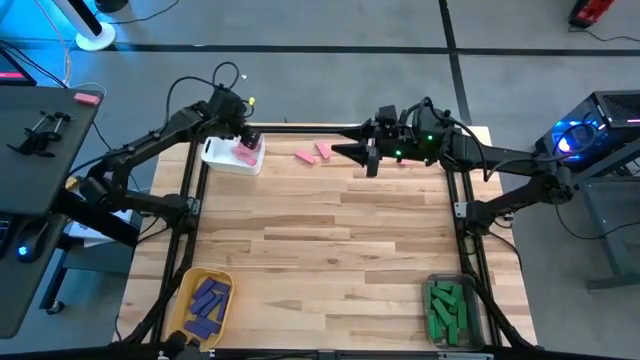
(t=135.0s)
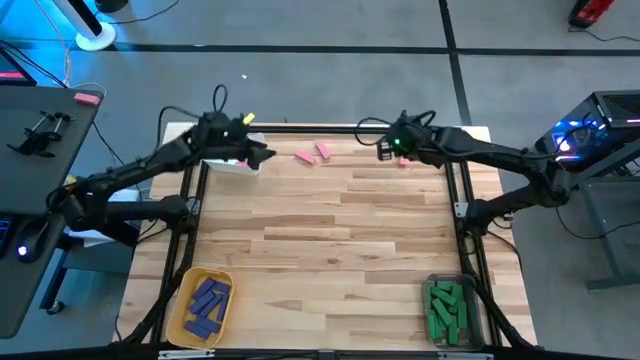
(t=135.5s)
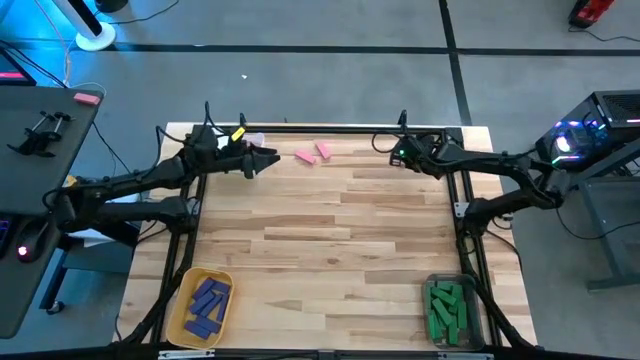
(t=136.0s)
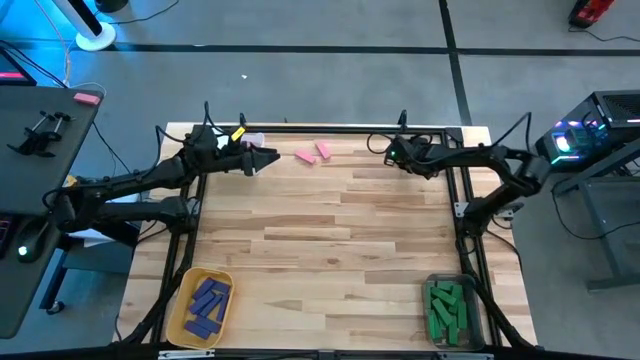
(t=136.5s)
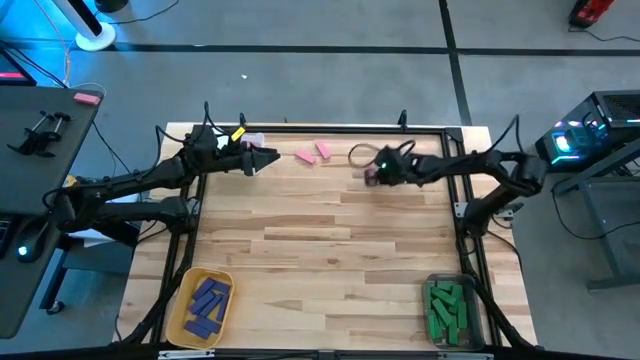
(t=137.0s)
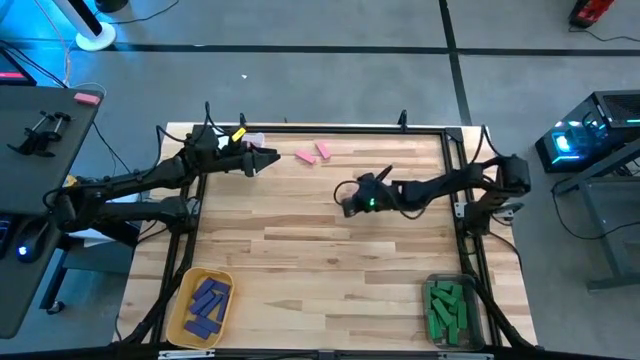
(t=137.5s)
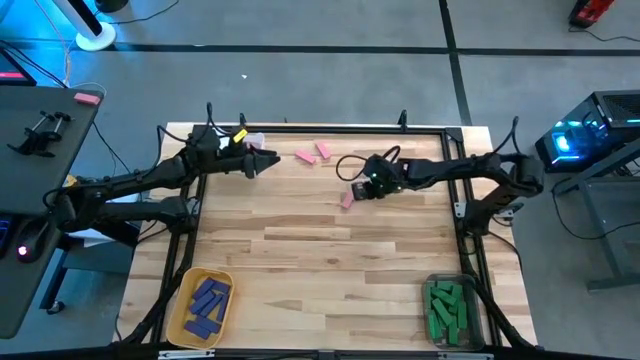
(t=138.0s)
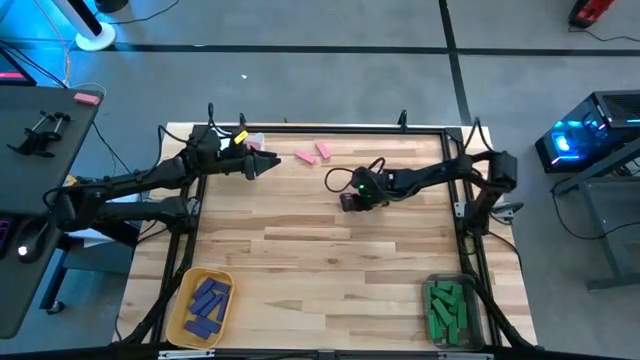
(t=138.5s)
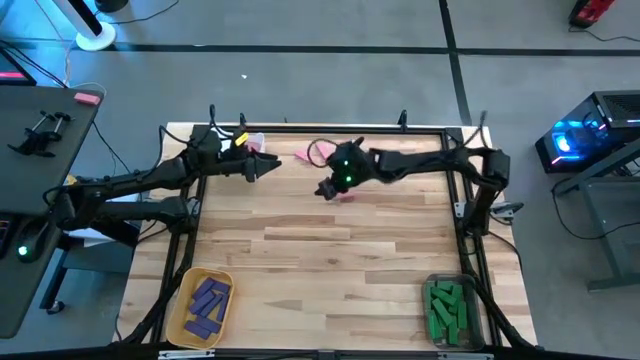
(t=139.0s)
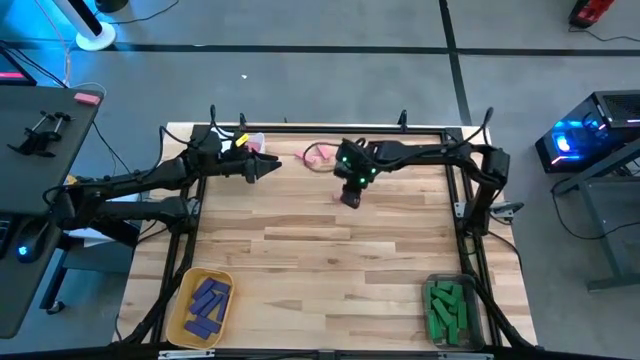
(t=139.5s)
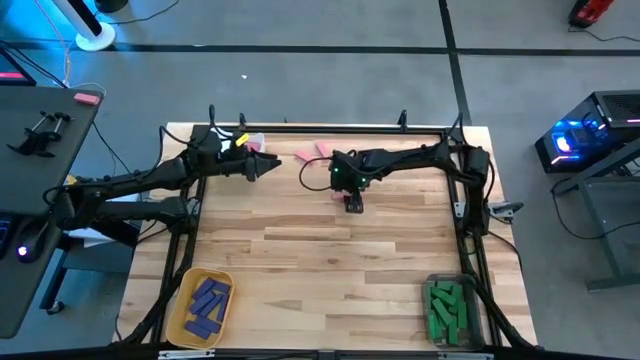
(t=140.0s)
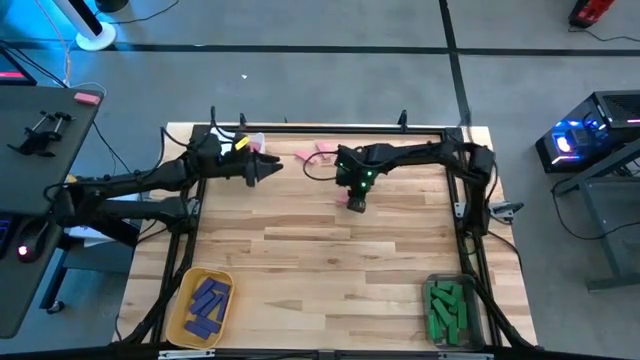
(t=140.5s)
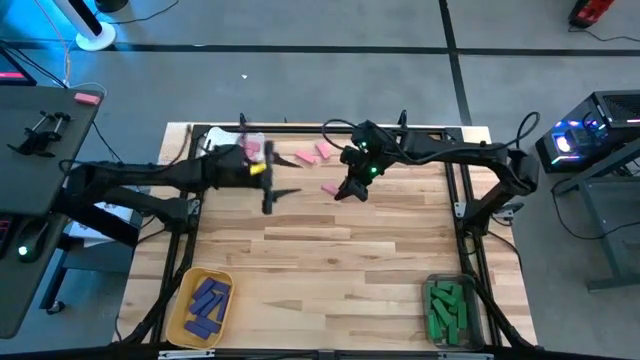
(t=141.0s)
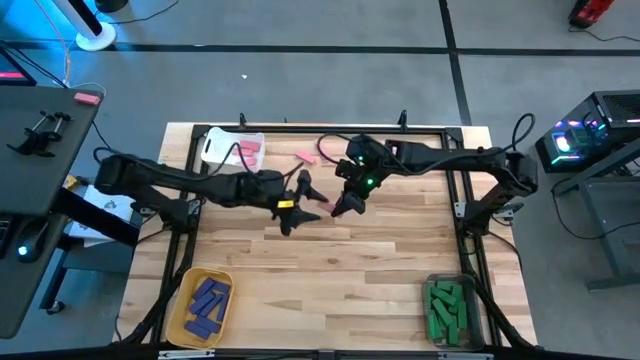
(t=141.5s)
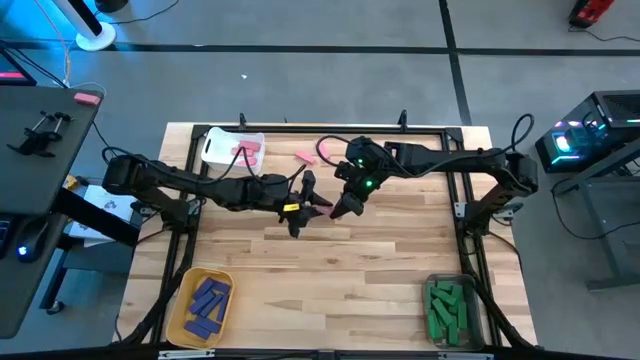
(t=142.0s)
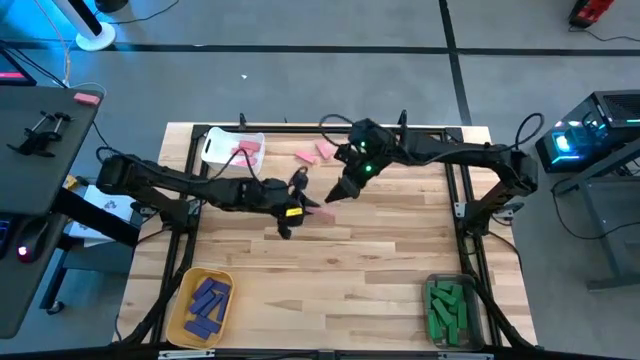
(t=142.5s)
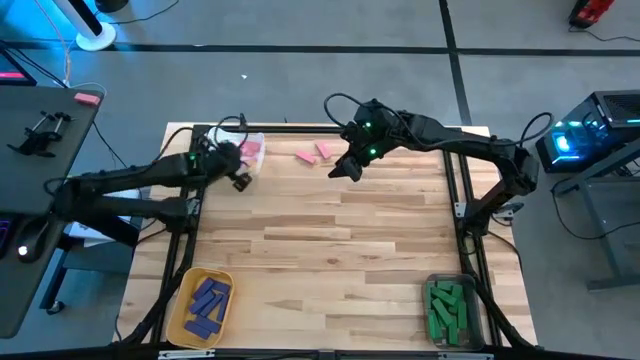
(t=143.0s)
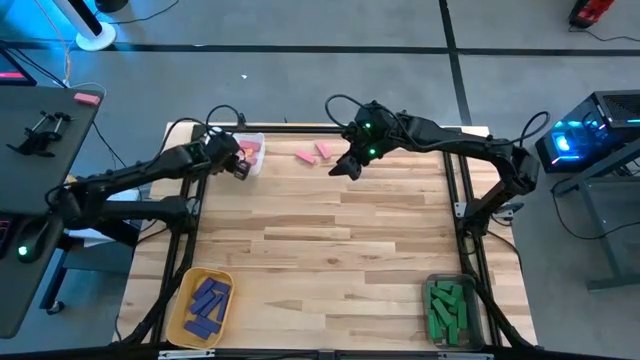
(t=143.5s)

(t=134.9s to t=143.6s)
Task: Sort blocks
Put the pink block into the white bin

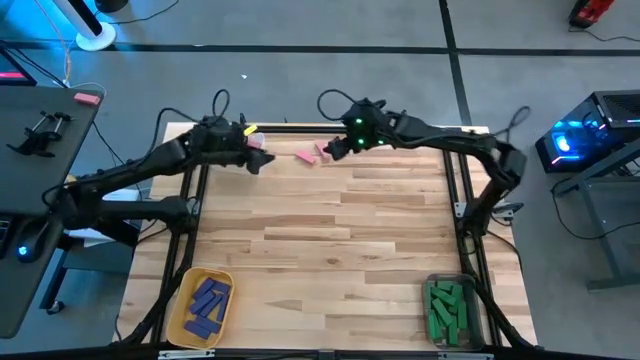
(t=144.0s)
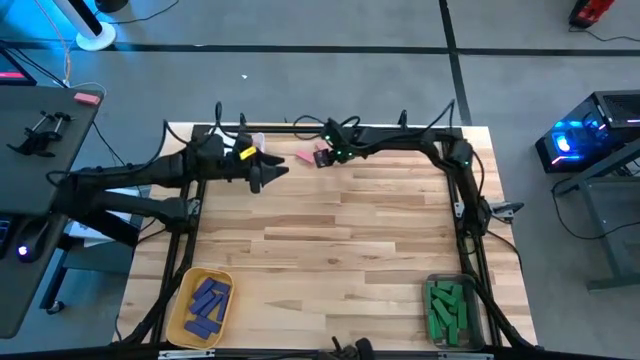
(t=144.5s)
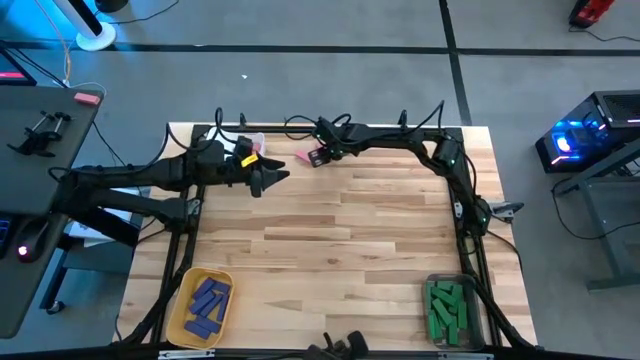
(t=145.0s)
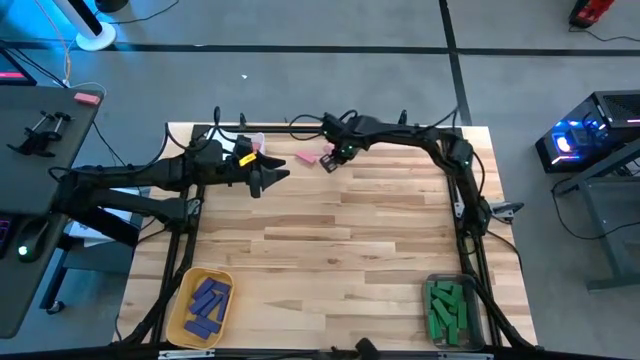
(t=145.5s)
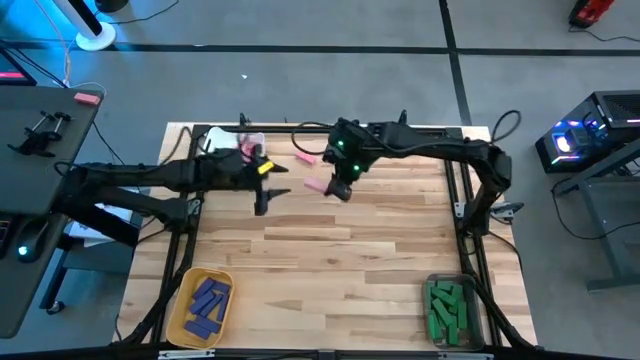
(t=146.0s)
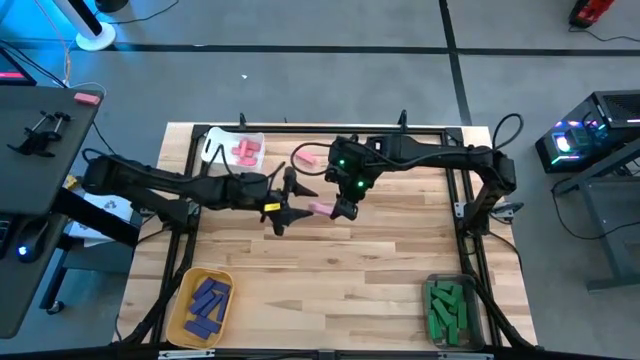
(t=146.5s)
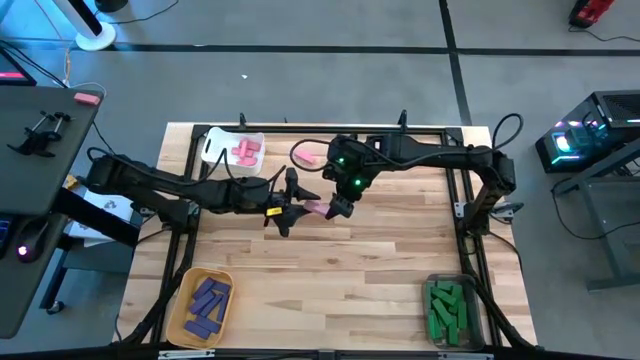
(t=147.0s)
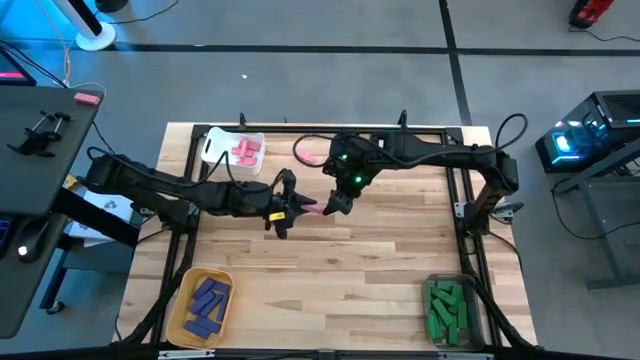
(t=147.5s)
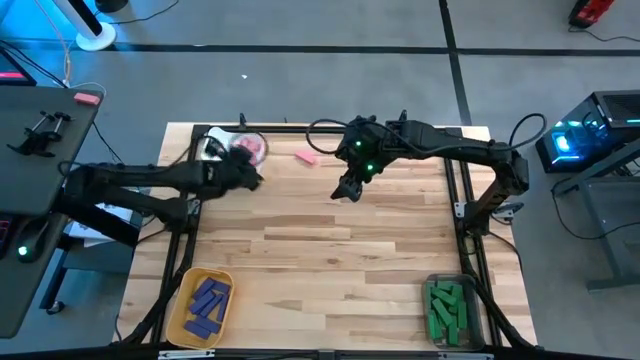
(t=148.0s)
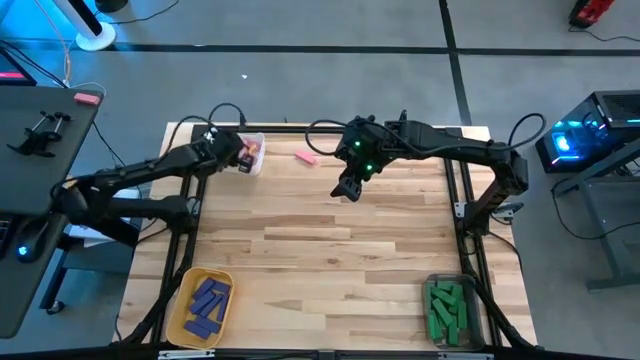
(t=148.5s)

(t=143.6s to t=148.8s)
Put the pink block into the white bin

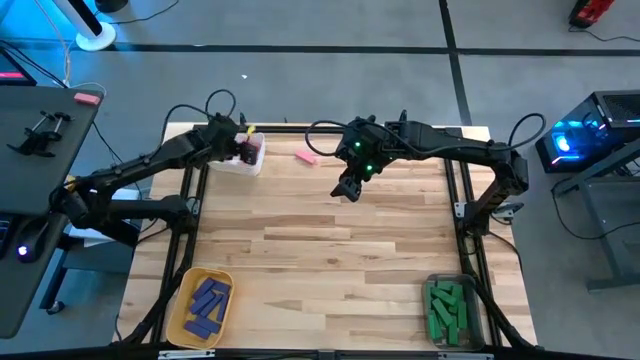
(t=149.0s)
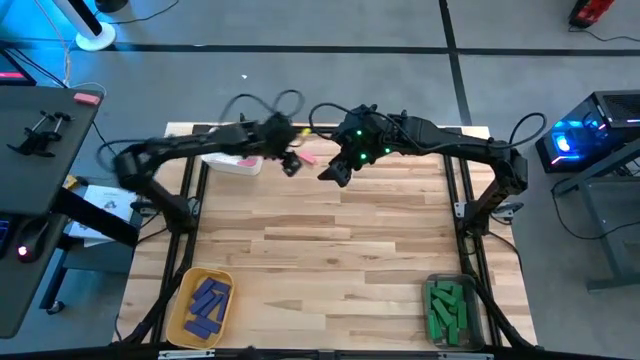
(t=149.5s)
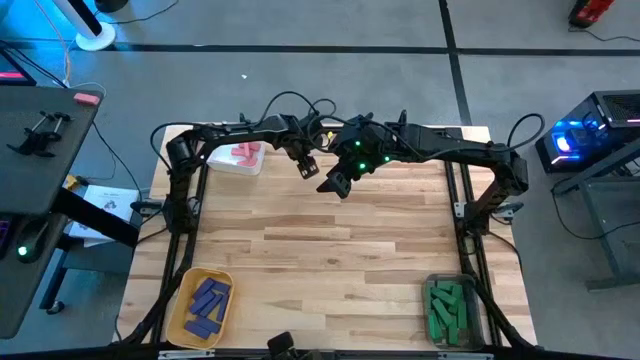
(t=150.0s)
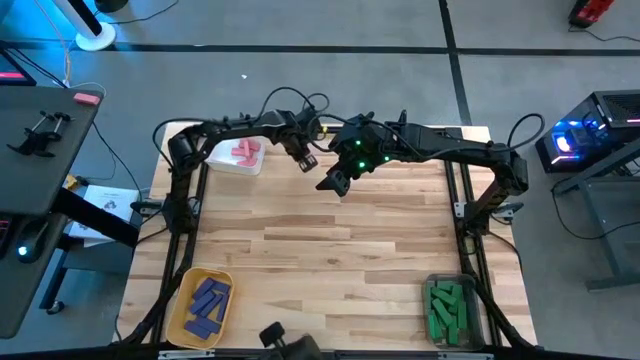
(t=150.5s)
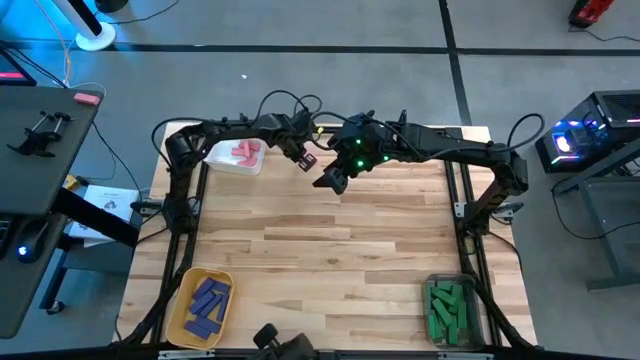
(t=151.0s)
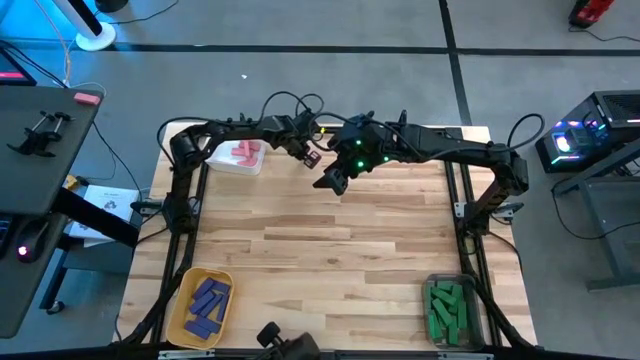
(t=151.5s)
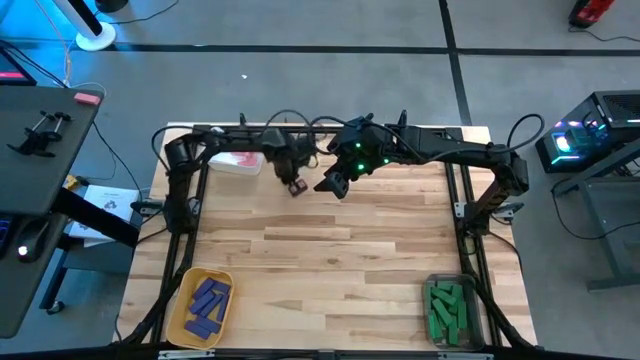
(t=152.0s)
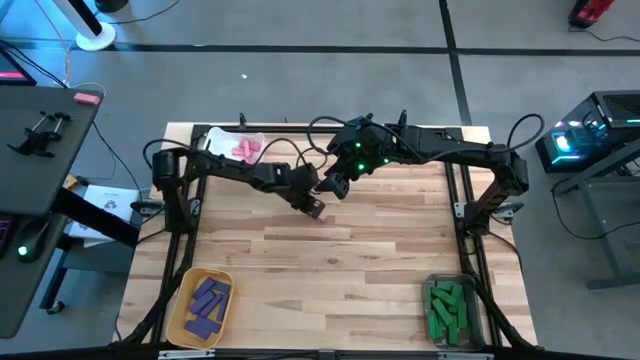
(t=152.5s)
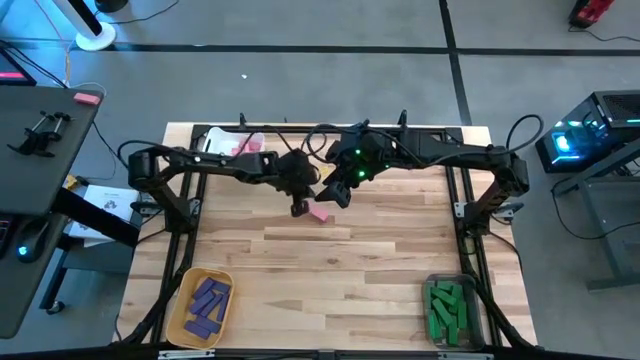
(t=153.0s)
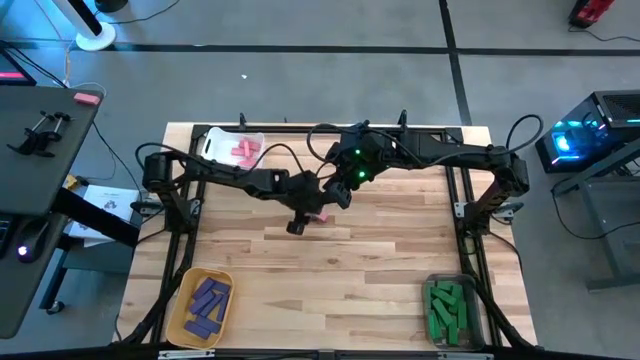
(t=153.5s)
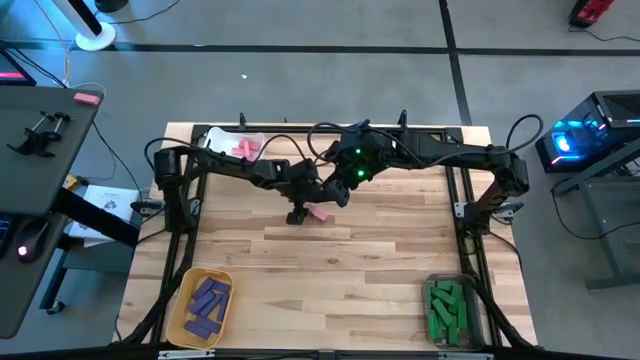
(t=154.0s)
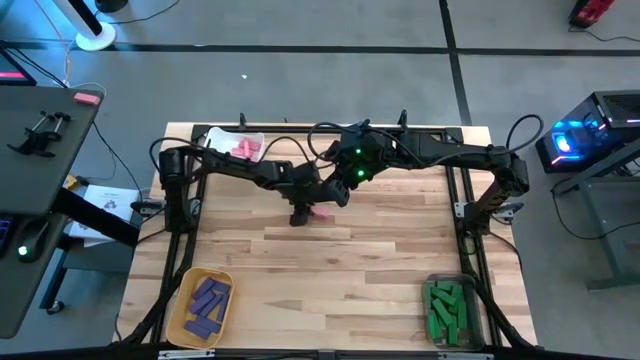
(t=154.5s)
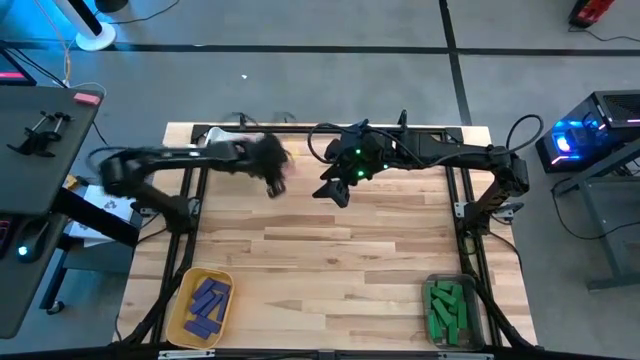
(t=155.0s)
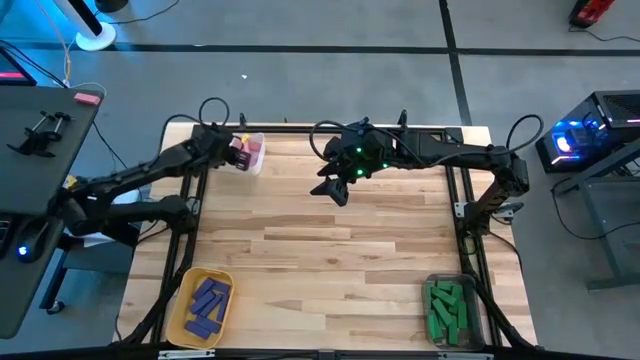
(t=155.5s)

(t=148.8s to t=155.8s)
Put the pink block into the white bin
